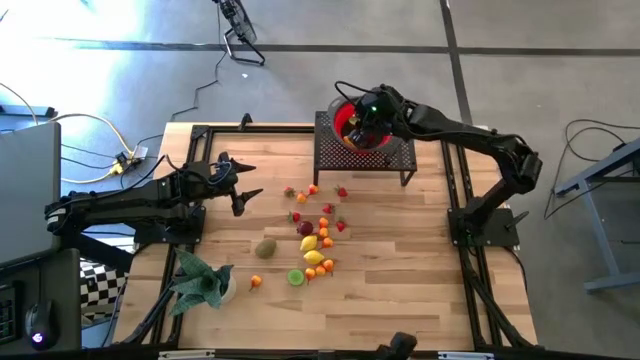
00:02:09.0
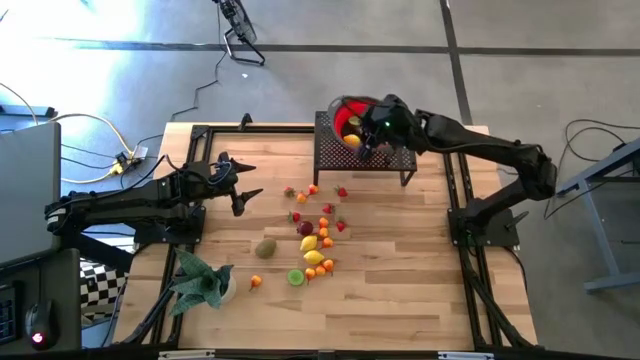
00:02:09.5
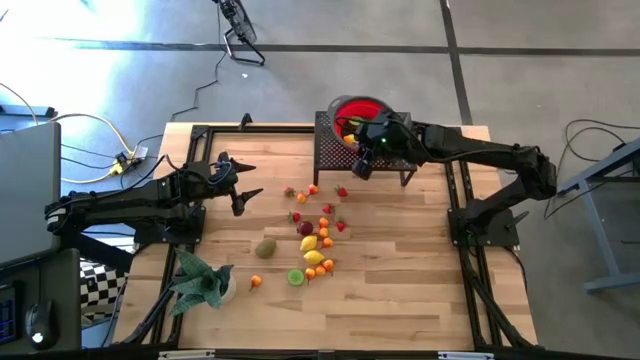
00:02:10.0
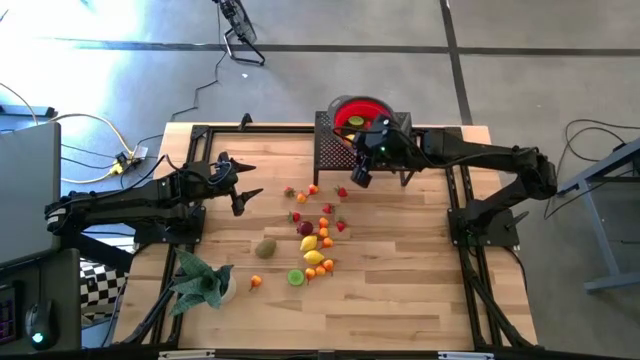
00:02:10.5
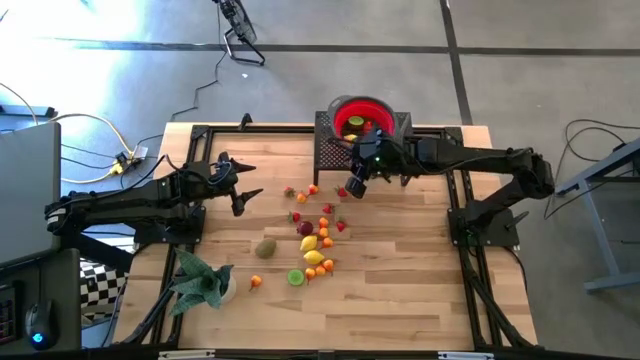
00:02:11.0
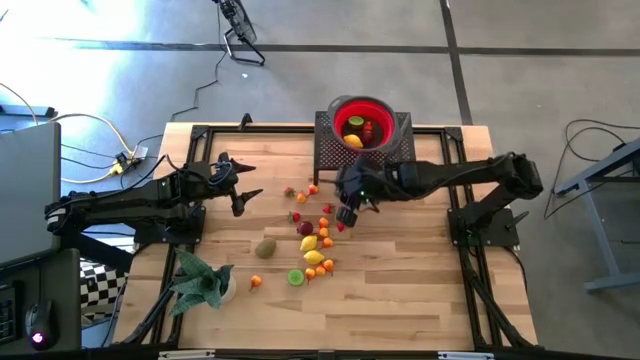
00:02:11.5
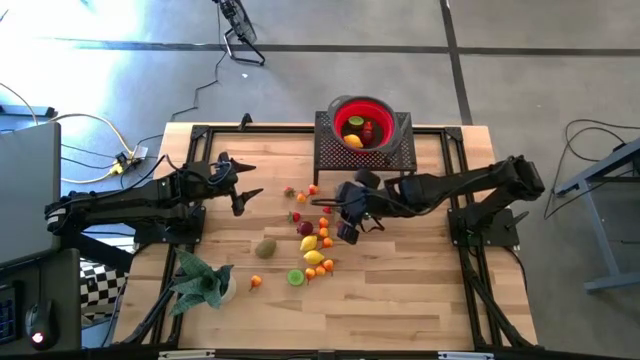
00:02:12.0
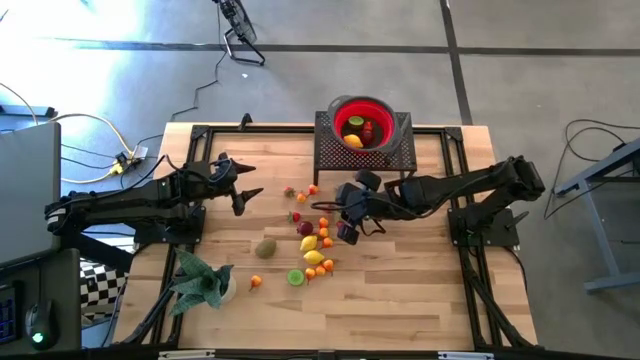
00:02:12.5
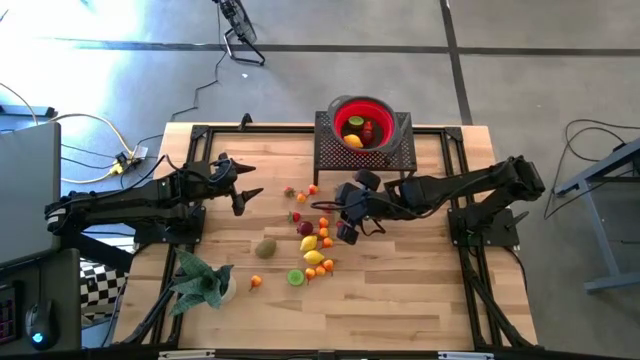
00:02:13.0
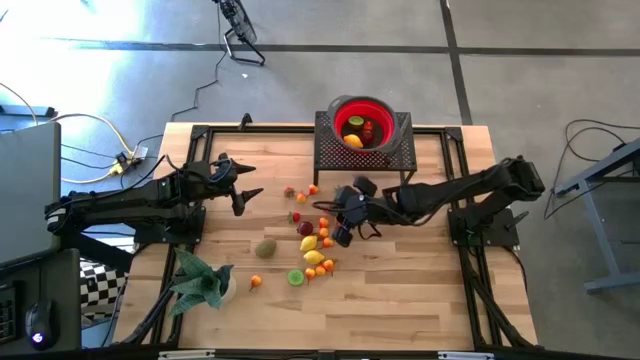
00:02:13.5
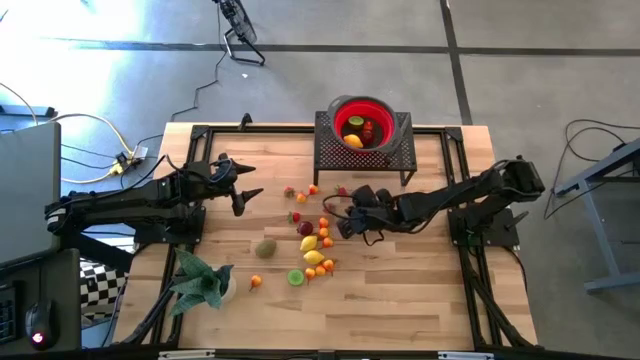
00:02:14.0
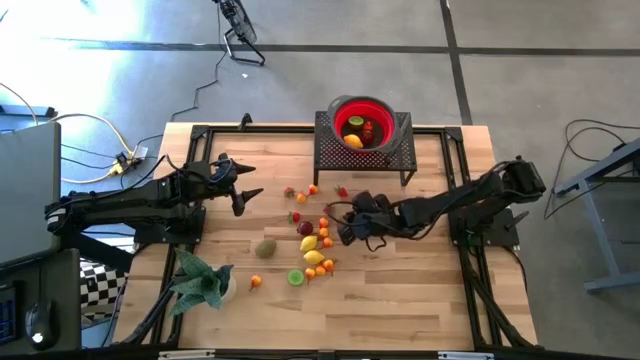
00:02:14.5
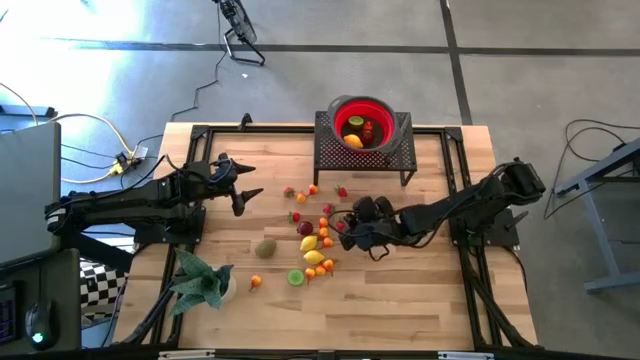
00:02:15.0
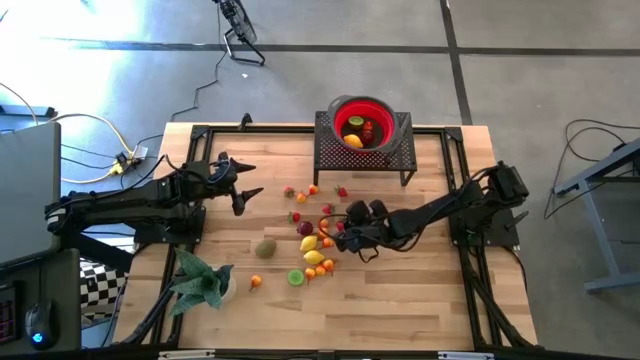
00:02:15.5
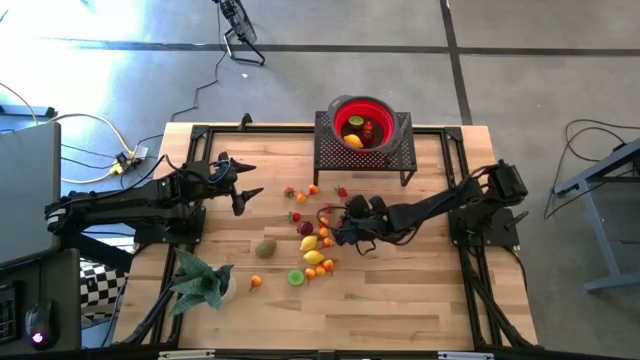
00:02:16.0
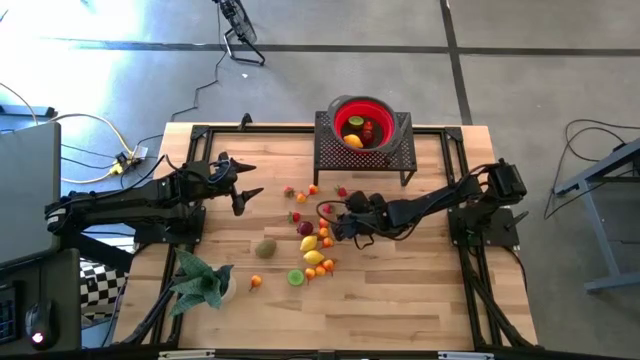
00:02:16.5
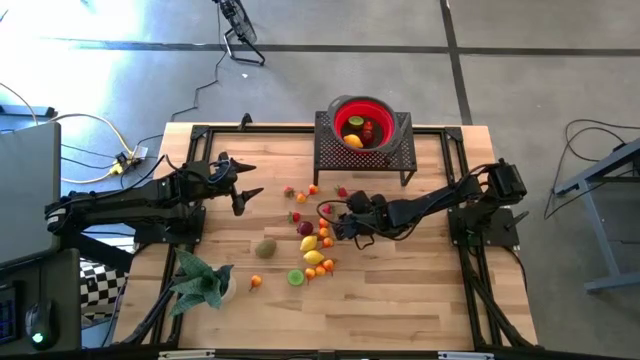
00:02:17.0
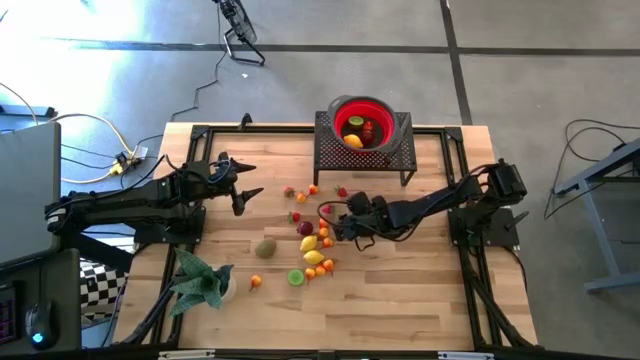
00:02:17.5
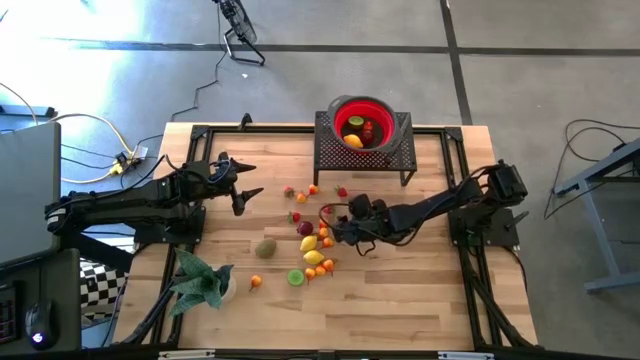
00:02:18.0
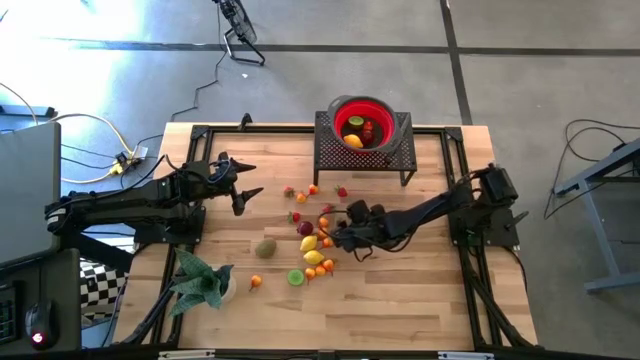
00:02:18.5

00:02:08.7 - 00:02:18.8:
Task: Pick & Place Fruit
Put the strawberry into the strainer on the shelf

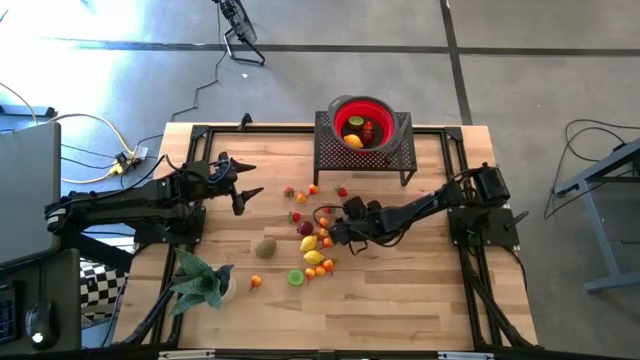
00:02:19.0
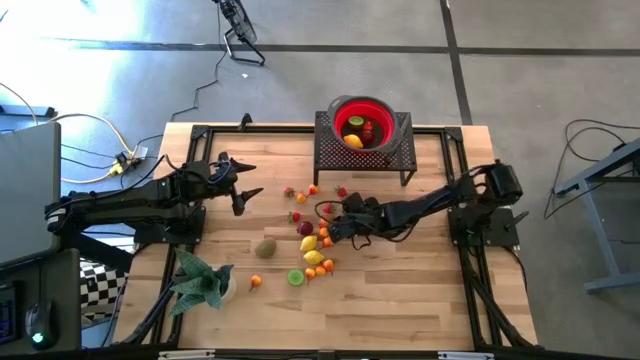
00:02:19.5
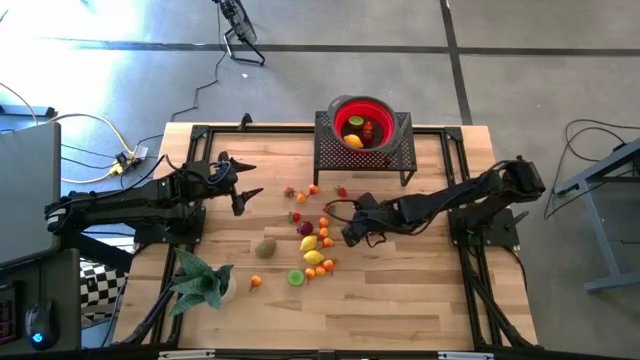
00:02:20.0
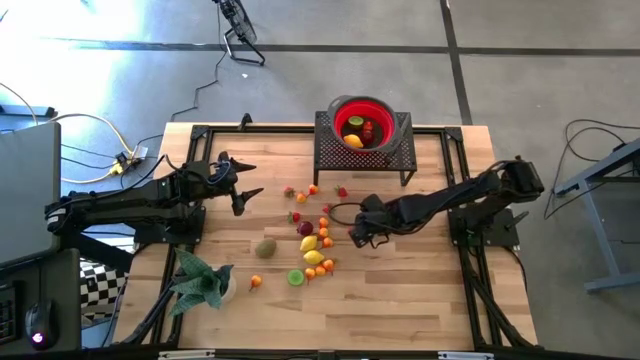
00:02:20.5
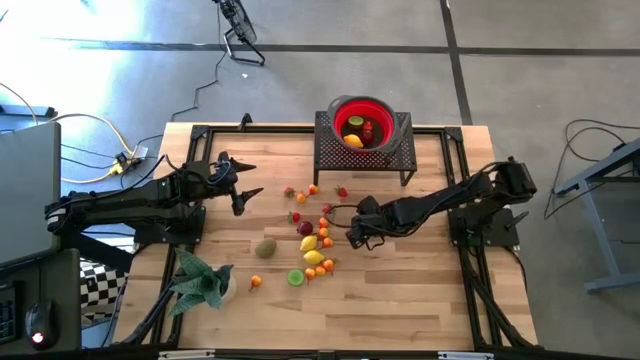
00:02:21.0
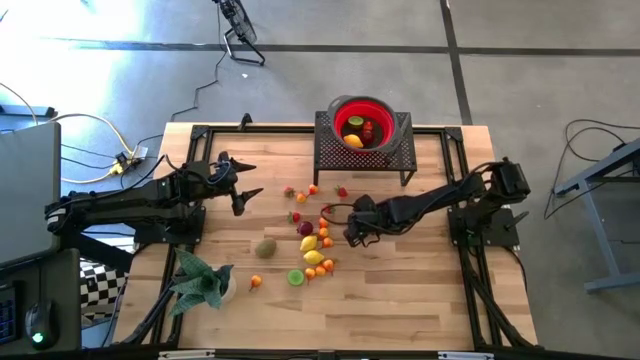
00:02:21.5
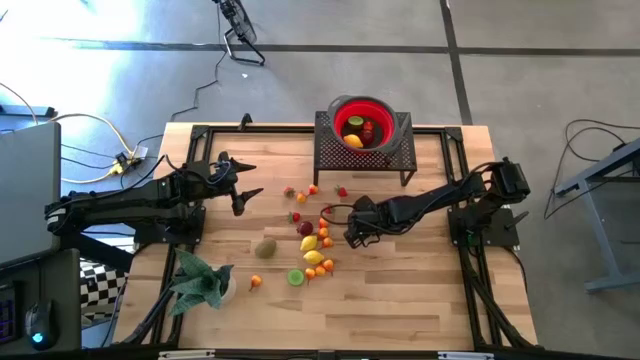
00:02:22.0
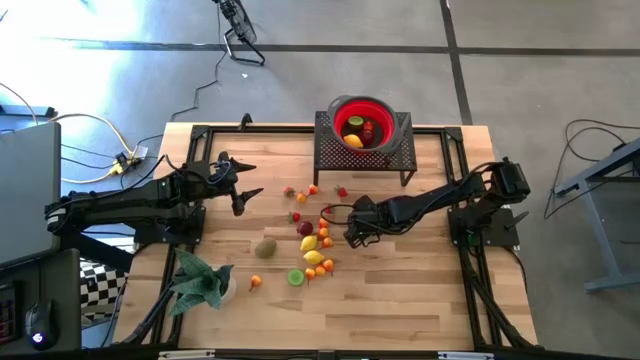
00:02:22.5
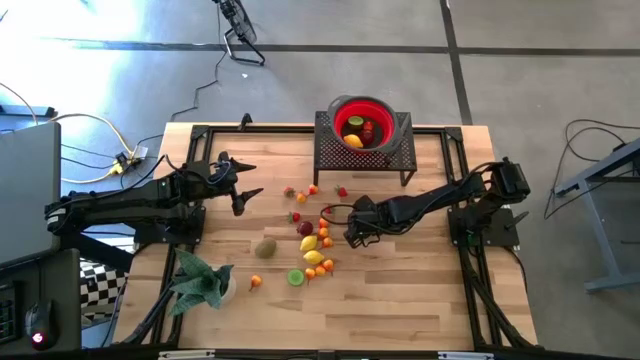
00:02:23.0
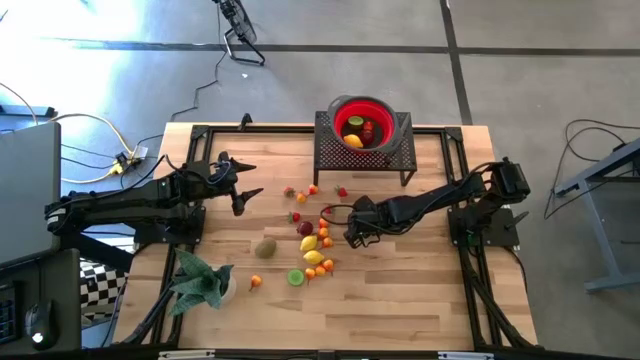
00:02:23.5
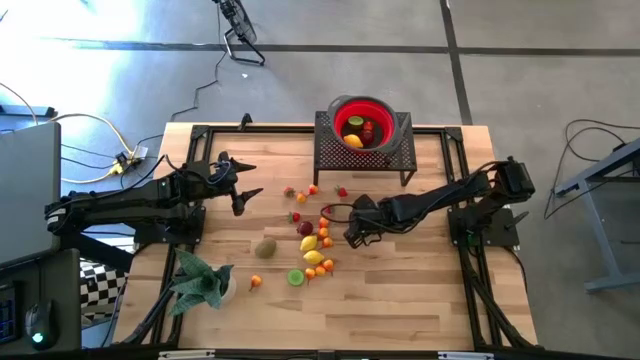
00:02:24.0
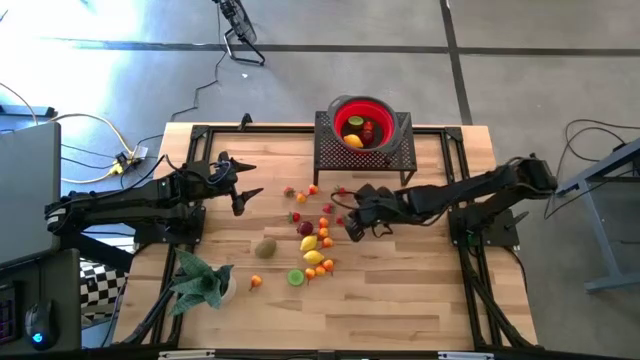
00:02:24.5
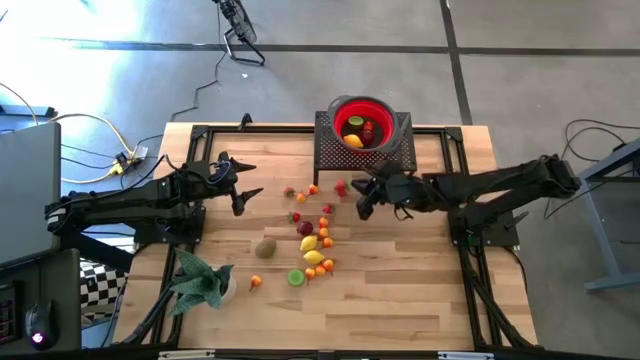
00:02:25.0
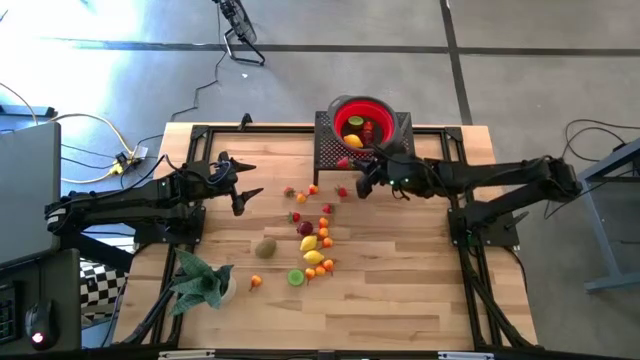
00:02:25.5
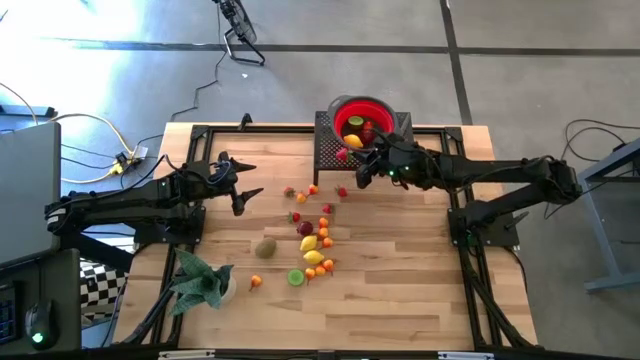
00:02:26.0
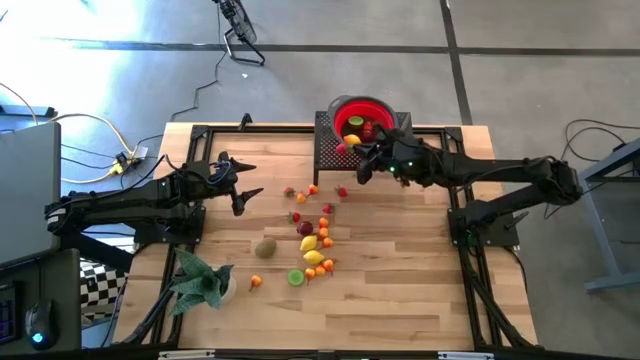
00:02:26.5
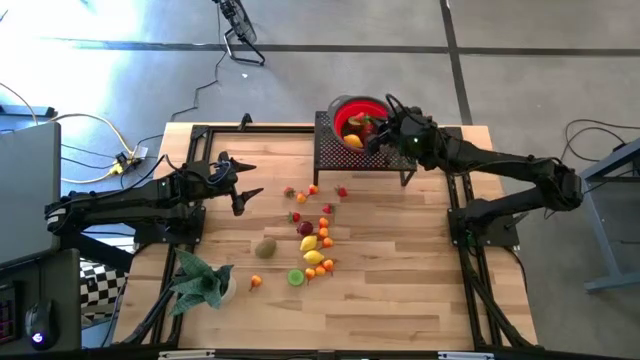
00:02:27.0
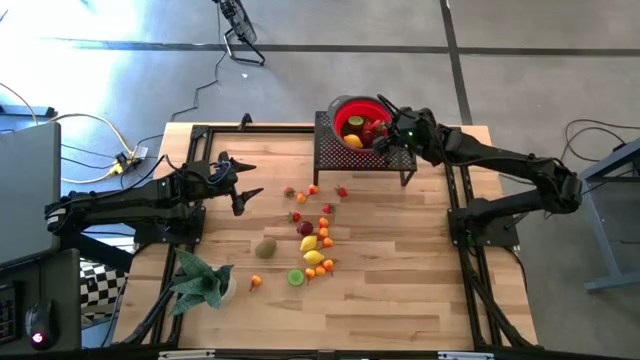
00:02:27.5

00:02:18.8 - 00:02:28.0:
Put the strawberry into the strainer on the shelf

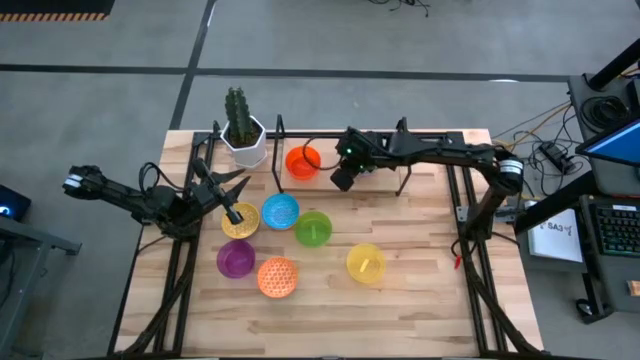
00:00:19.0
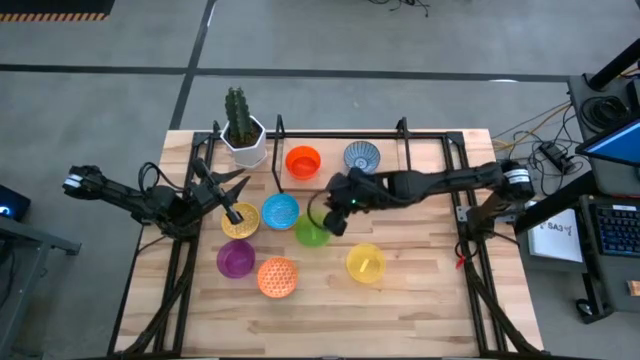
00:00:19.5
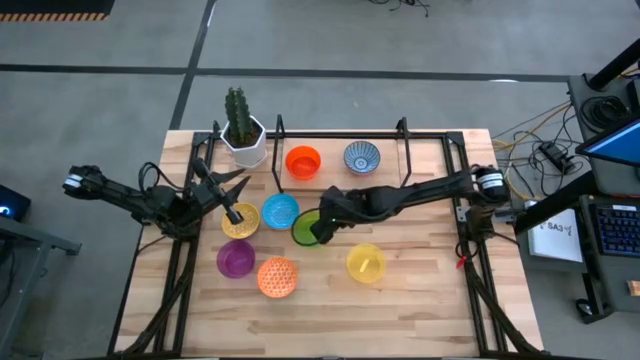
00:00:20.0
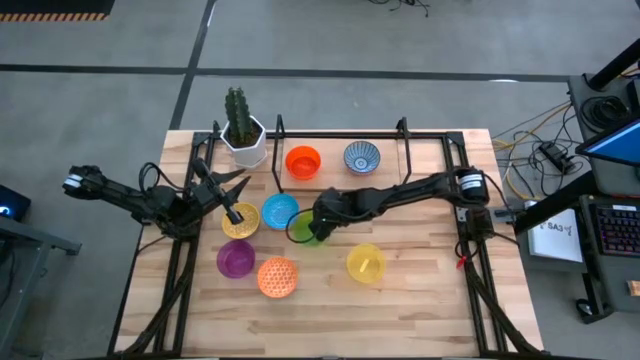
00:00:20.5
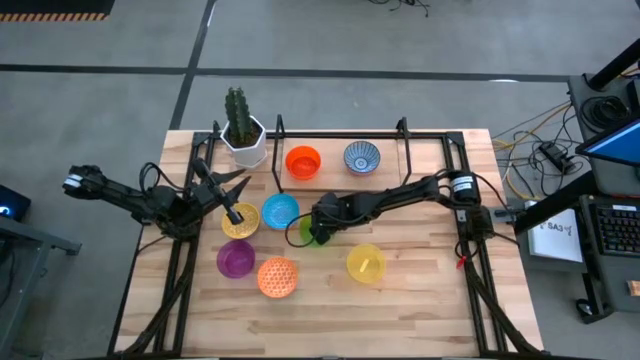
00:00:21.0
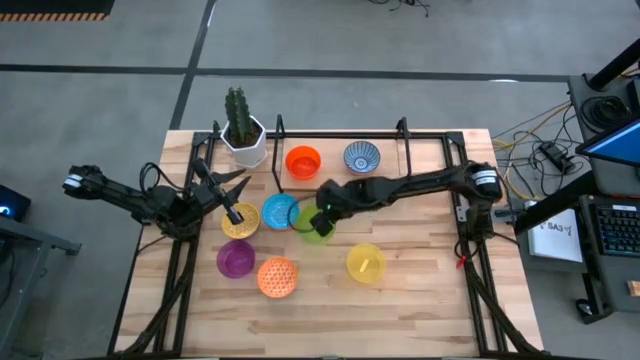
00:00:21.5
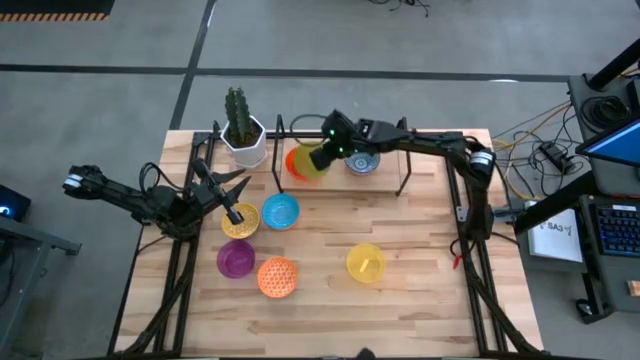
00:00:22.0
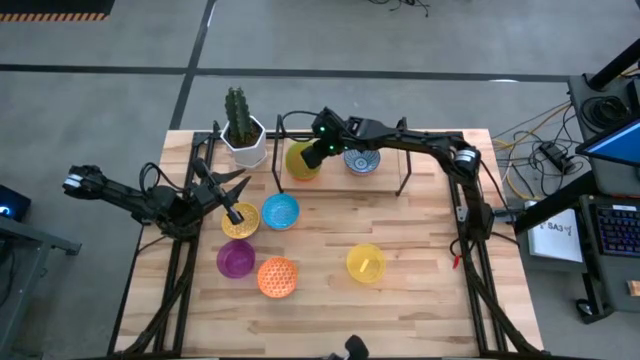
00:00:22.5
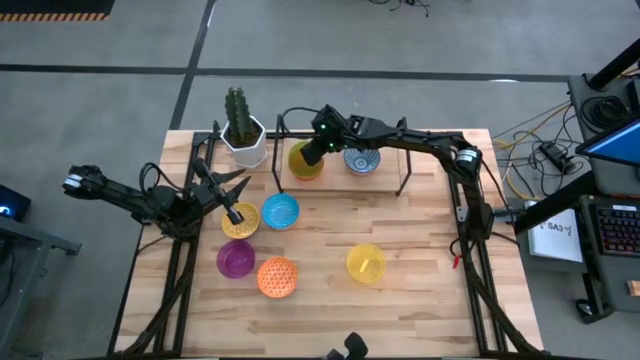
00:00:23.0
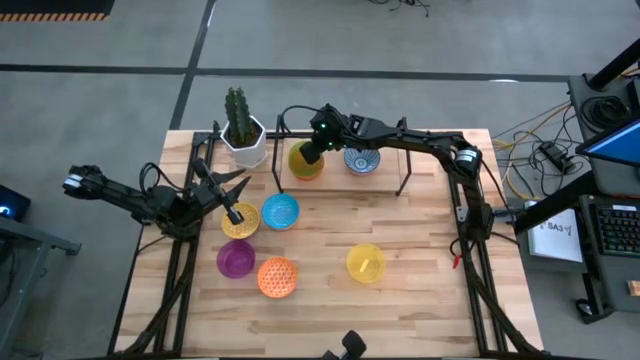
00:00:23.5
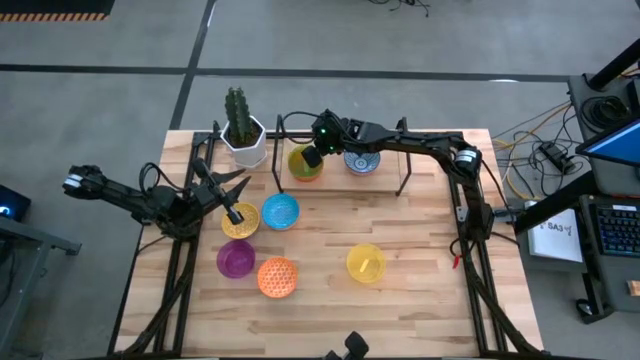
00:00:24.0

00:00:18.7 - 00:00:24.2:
Task: Place and stack bowls onto a shelf
Stack the green bowl on the orange bowl on the shelf
